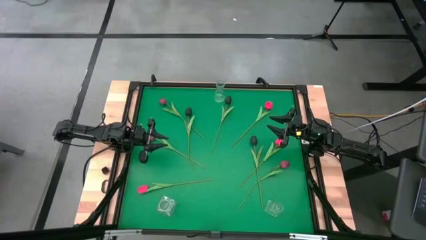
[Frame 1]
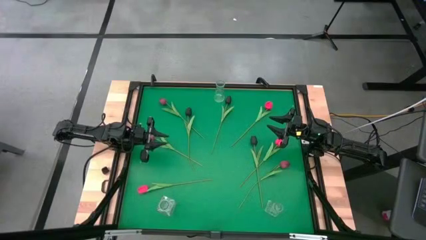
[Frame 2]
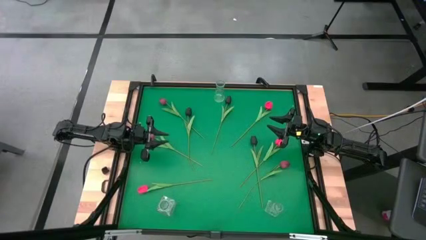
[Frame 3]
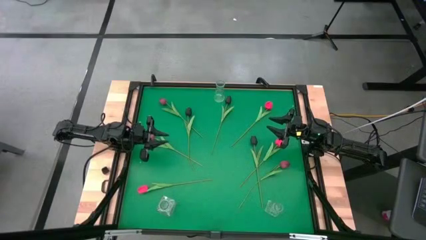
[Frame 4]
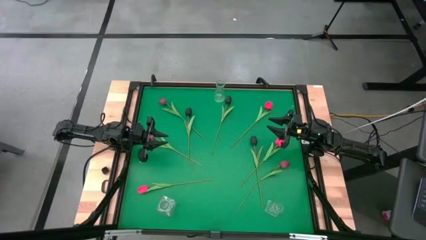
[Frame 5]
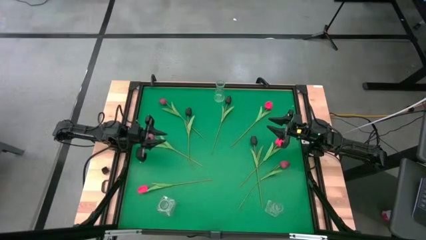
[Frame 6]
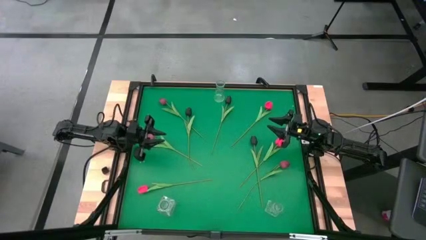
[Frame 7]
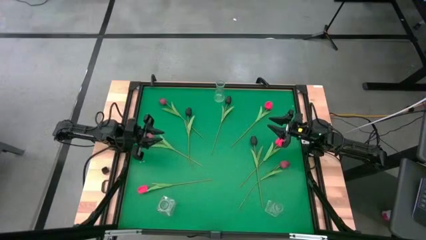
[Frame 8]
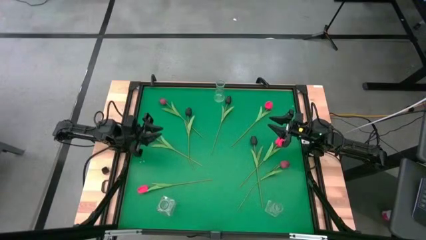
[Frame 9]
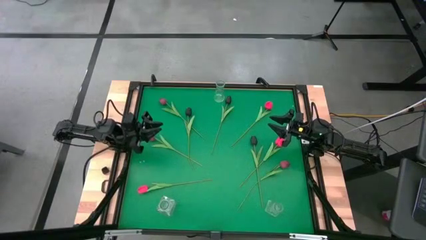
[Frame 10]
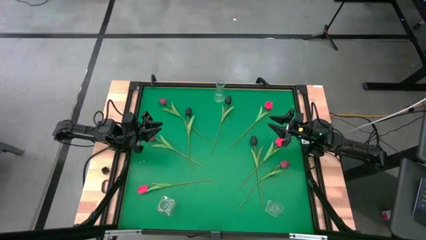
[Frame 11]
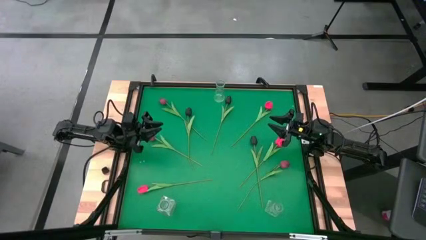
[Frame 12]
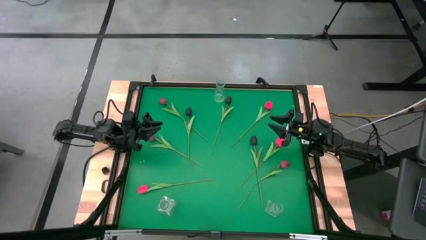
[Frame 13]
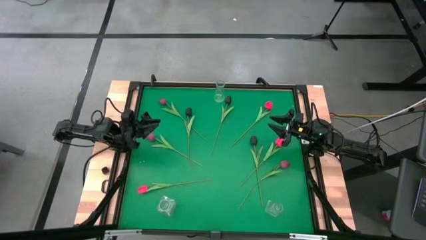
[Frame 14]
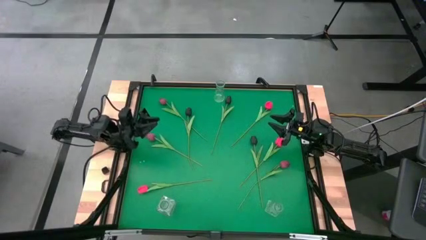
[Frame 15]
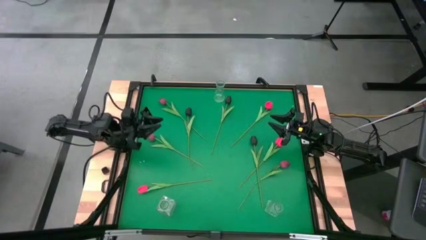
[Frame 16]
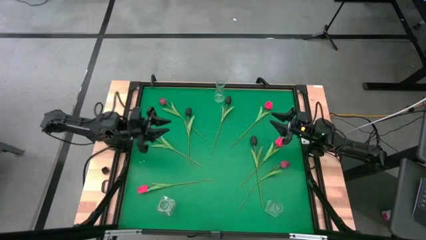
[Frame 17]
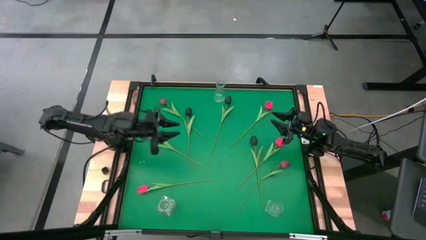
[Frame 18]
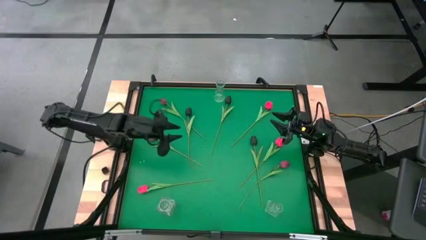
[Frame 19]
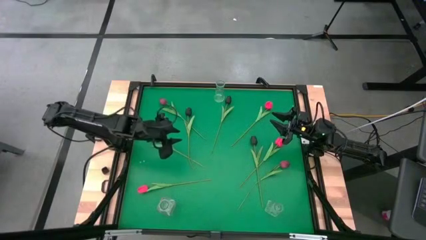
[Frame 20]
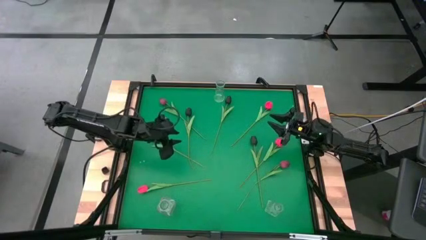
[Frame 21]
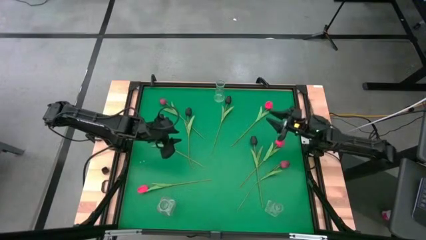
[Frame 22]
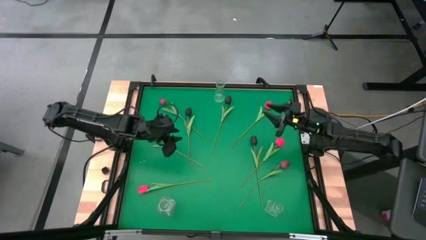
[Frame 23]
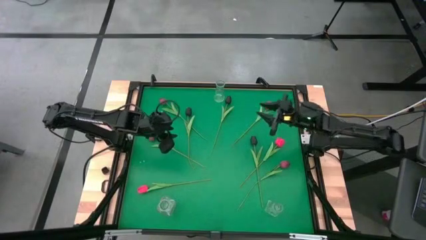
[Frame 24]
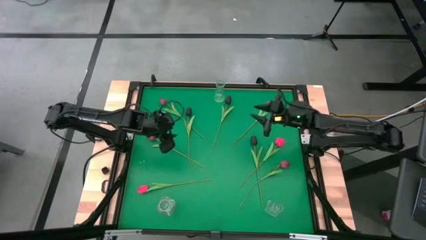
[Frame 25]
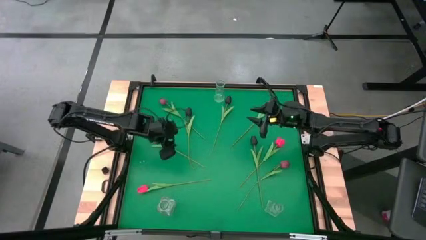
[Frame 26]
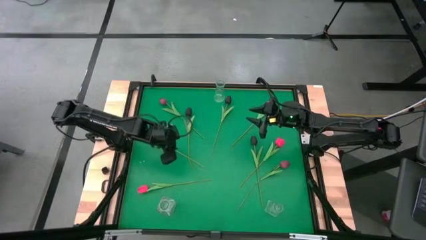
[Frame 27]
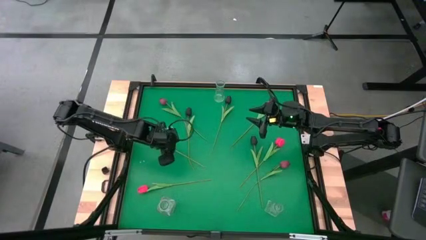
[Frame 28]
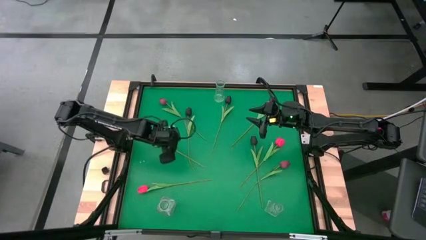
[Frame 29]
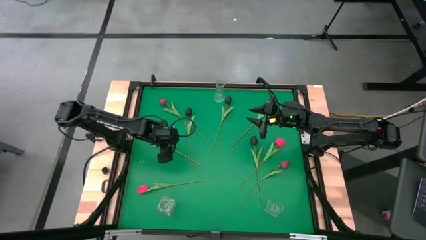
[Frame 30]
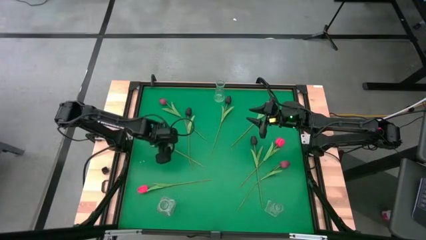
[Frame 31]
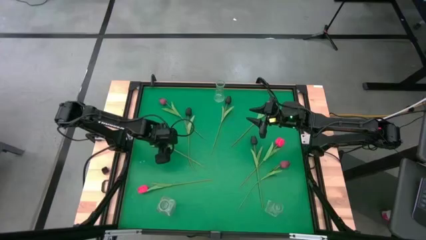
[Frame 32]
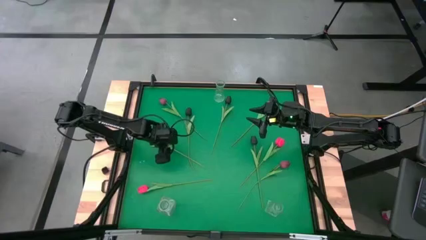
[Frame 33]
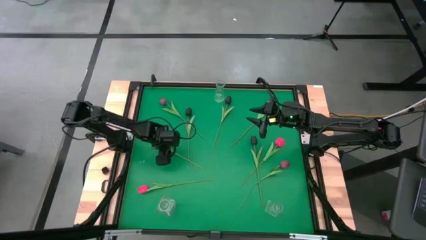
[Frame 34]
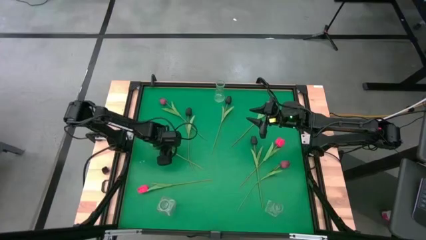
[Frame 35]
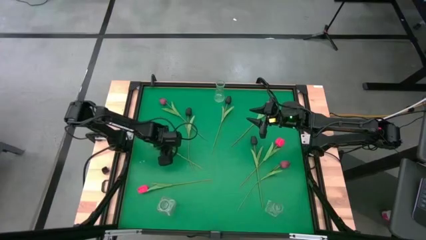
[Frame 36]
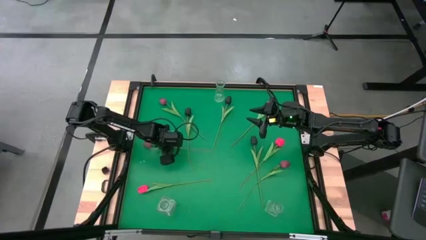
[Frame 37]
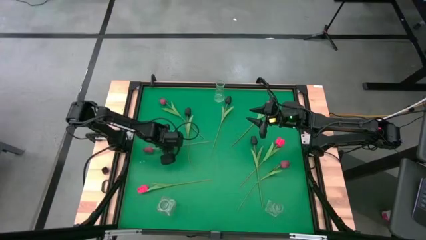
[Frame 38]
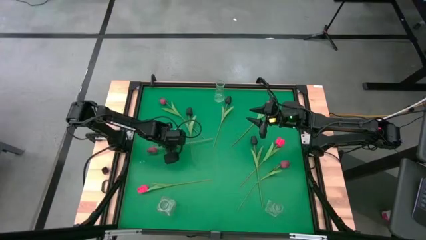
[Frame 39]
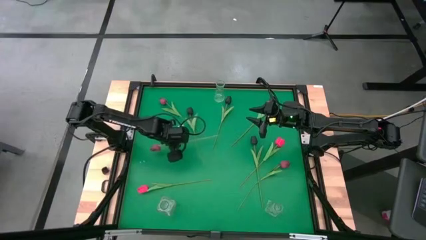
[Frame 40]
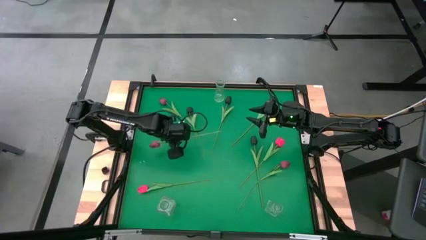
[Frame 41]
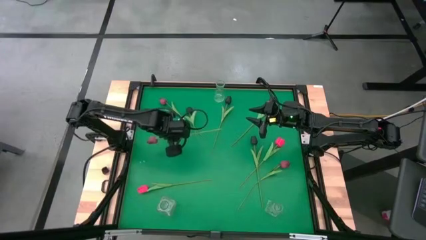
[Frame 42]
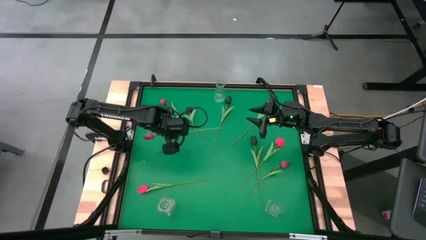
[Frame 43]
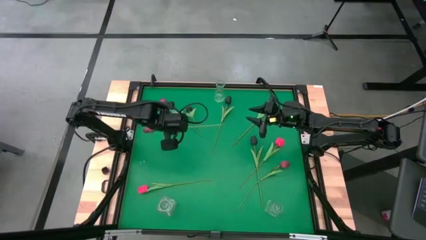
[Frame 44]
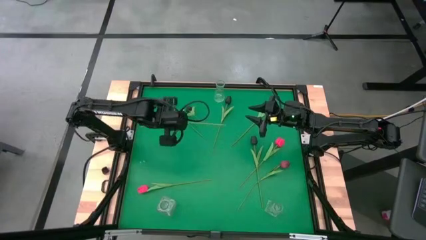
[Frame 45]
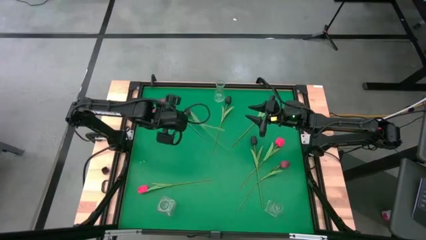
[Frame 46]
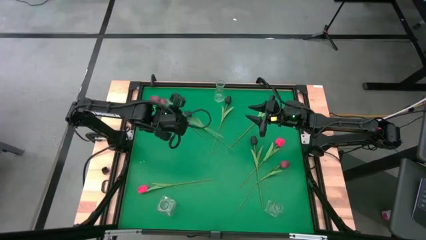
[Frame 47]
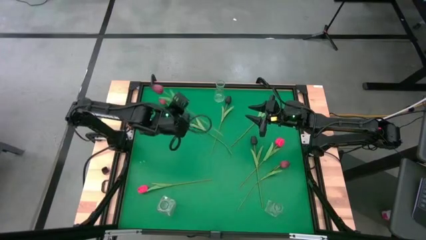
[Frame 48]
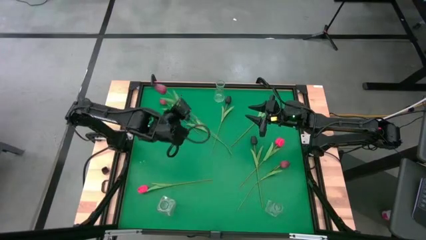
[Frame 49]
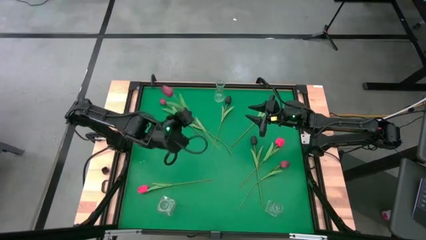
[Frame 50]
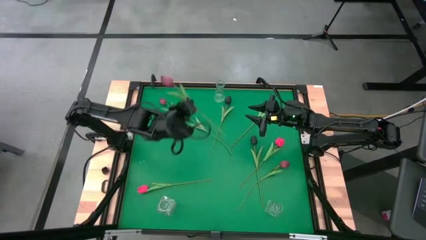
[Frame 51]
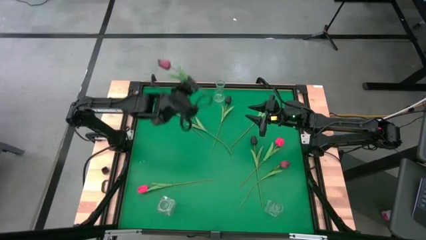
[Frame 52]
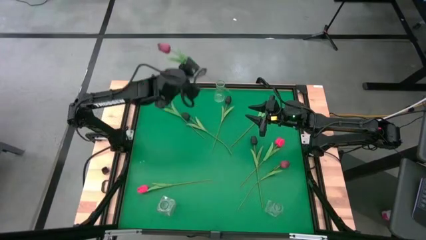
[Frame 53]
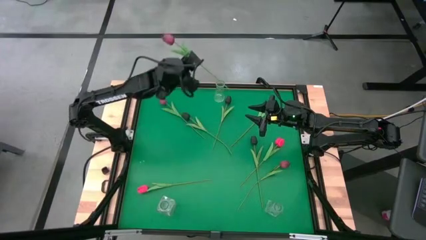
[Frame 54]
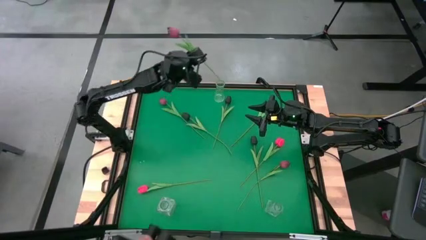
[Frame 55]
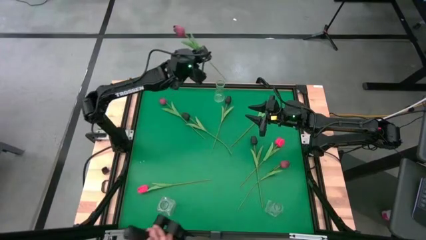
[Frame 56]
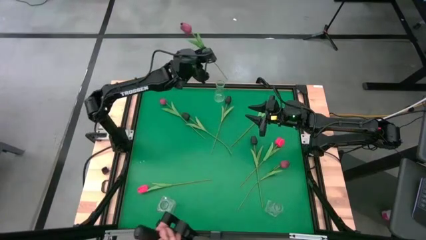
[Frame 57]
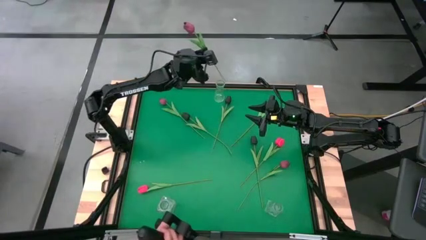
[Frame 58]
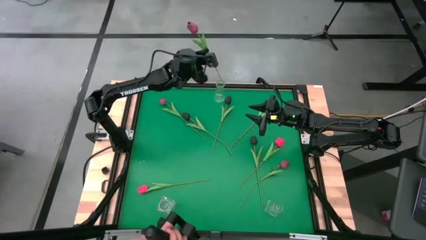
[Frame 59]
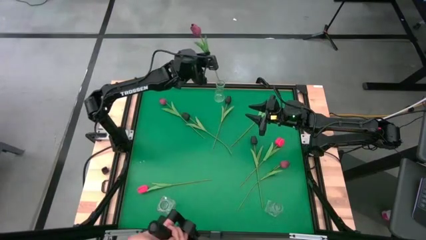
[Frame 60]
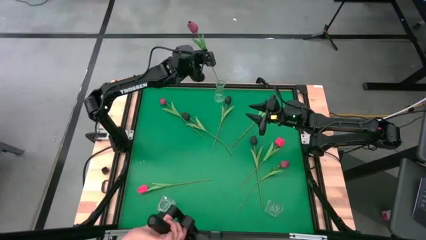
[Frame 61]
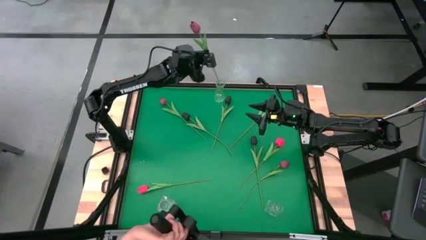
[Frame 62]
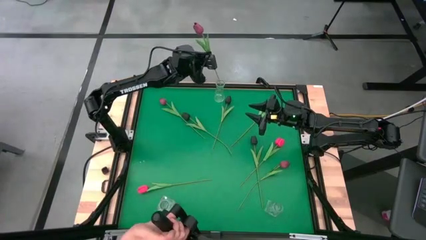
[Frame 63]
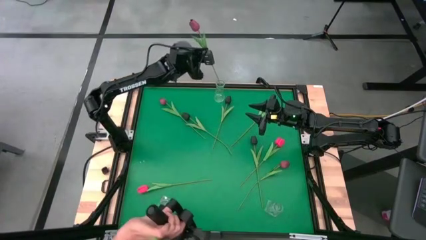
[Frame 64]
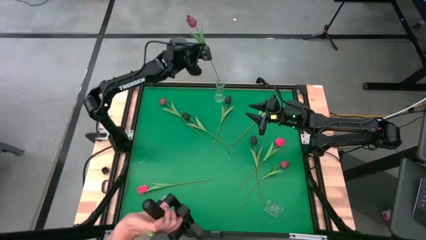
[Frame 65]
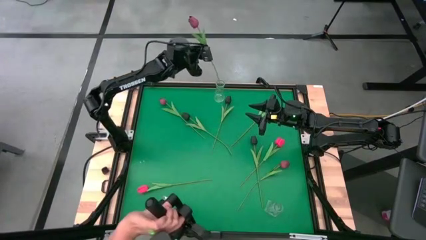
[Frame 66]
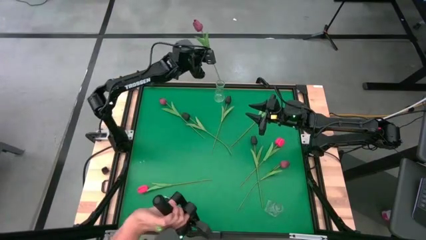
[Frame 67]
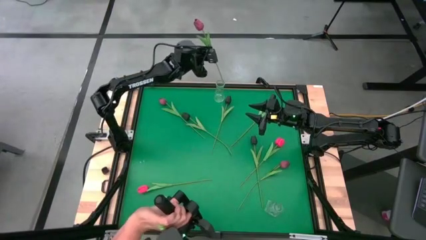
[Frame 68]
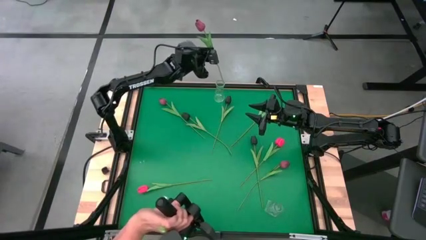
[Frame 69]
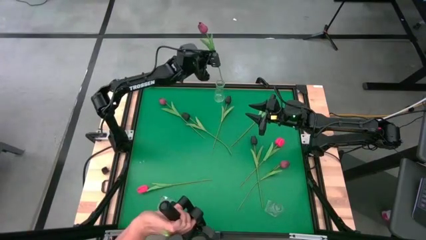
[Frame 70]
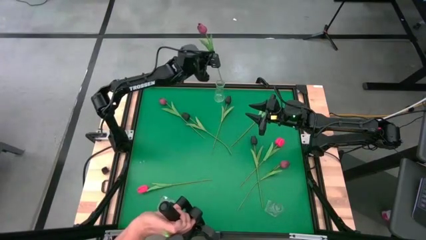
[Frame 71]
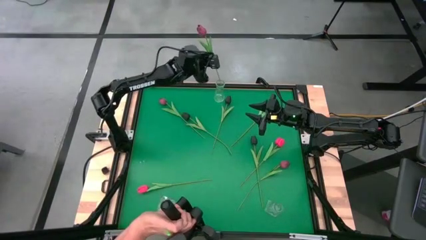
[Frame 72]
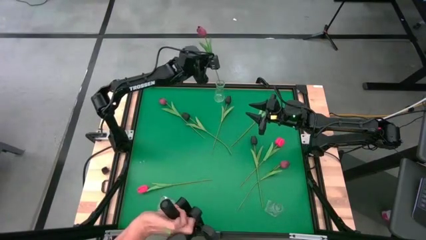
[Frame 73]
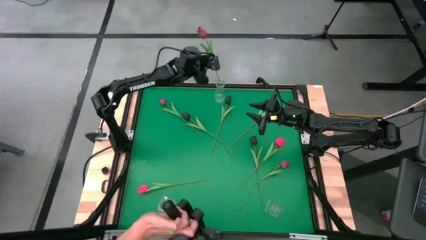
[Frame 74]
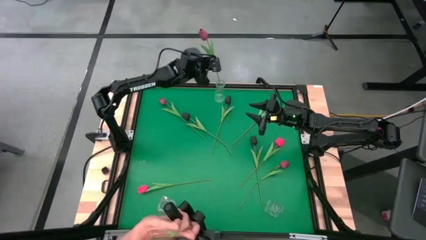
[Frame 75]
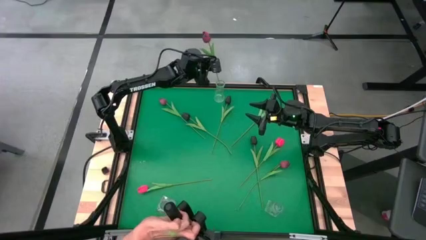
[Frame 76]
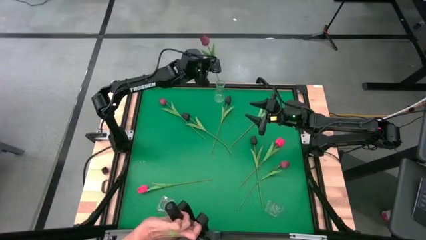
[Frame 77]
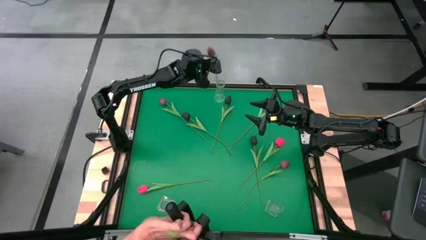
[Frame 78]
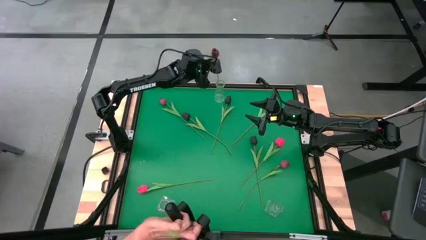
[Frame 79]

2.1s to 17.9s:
Task: Sort flowers into vase by color
Put the middle dark red tulip into the top transparent vase
